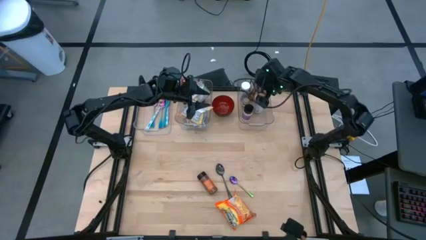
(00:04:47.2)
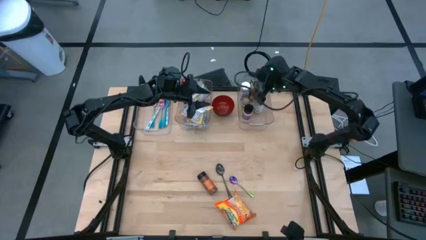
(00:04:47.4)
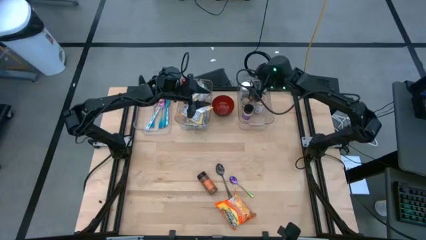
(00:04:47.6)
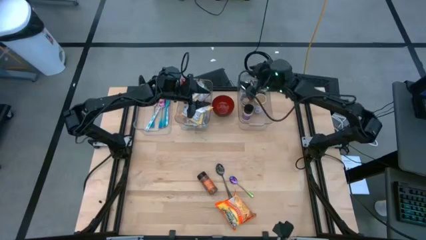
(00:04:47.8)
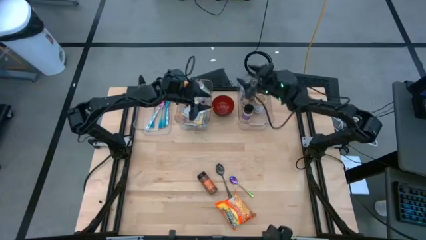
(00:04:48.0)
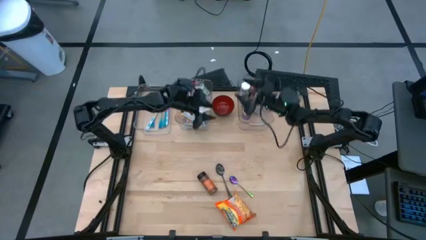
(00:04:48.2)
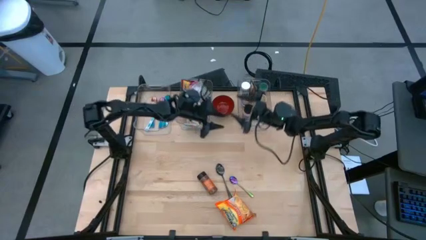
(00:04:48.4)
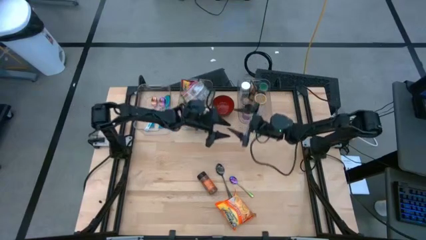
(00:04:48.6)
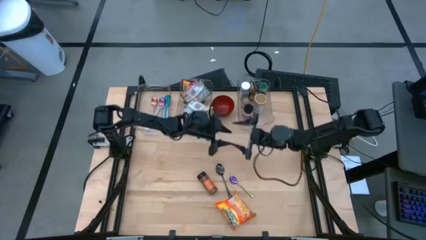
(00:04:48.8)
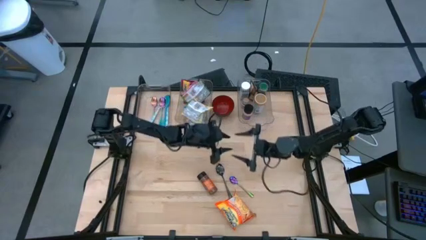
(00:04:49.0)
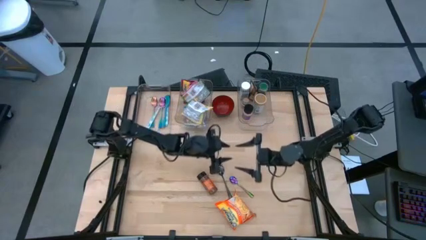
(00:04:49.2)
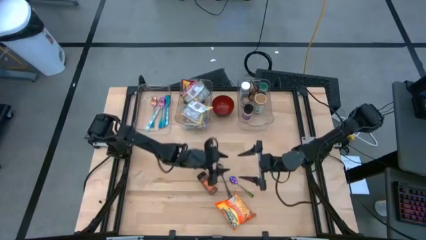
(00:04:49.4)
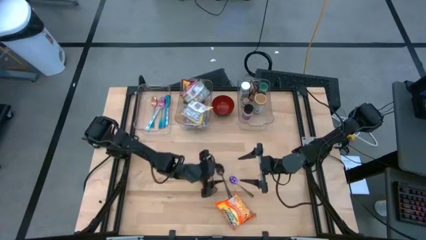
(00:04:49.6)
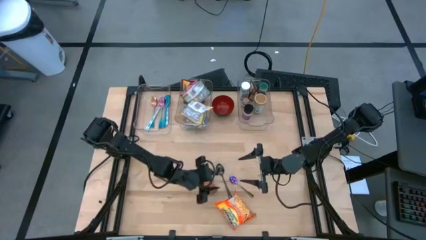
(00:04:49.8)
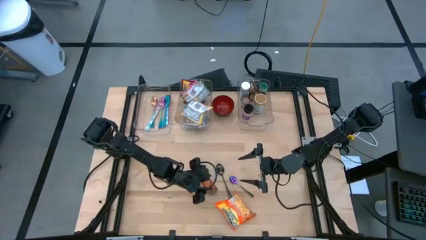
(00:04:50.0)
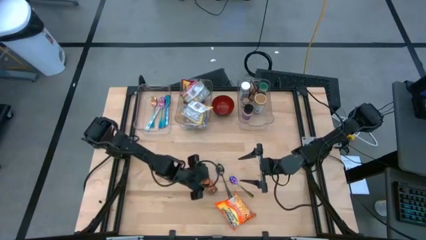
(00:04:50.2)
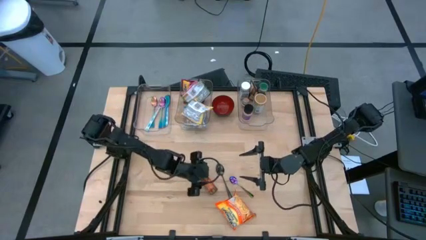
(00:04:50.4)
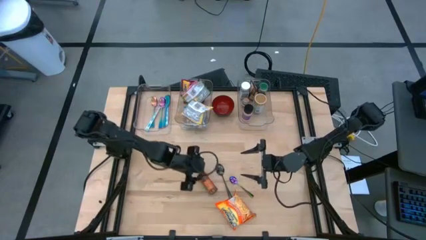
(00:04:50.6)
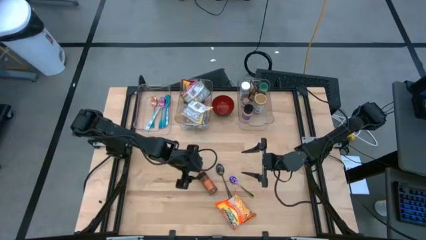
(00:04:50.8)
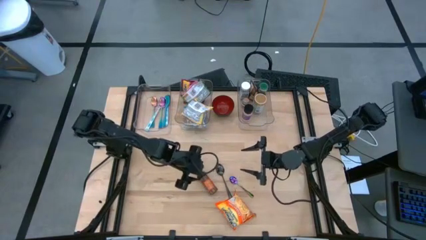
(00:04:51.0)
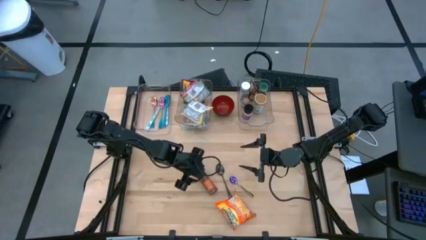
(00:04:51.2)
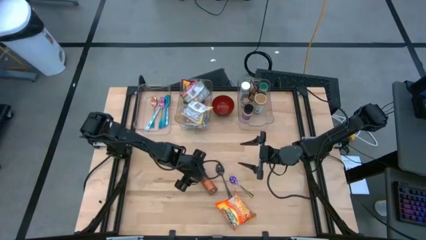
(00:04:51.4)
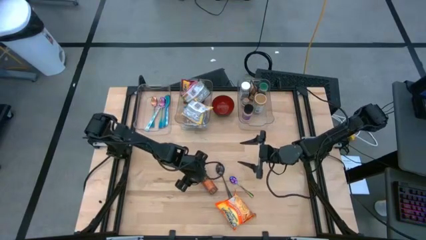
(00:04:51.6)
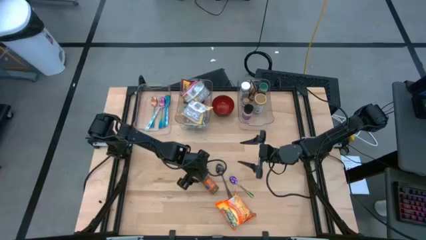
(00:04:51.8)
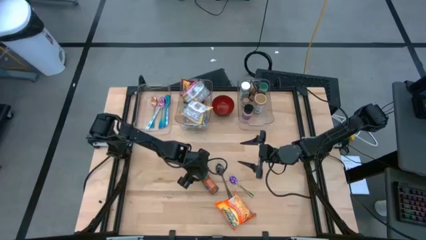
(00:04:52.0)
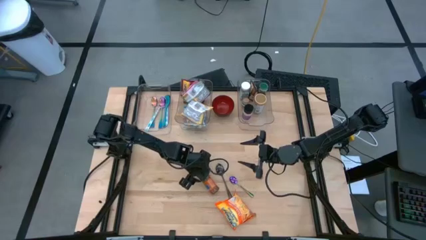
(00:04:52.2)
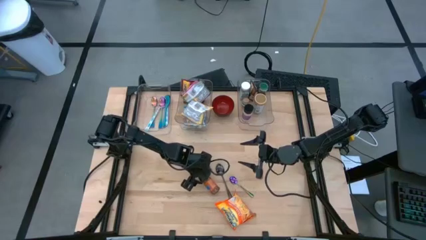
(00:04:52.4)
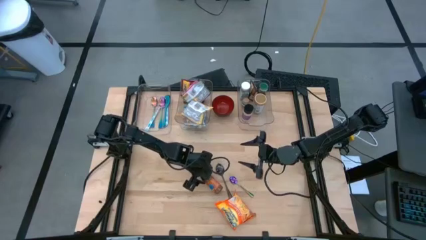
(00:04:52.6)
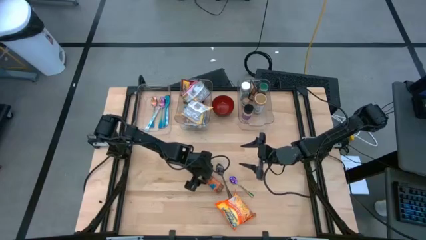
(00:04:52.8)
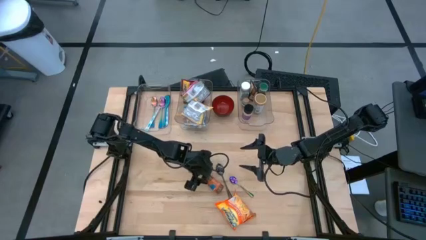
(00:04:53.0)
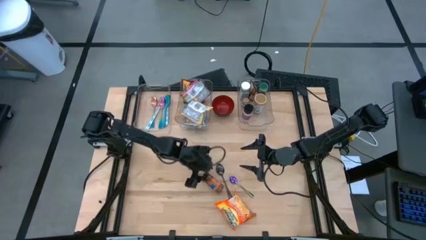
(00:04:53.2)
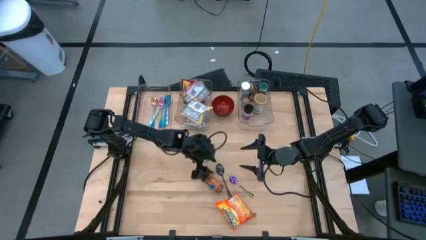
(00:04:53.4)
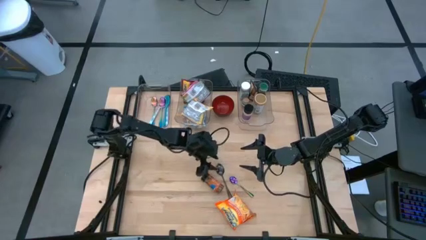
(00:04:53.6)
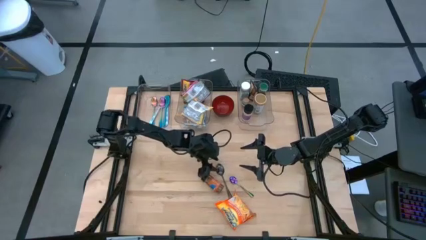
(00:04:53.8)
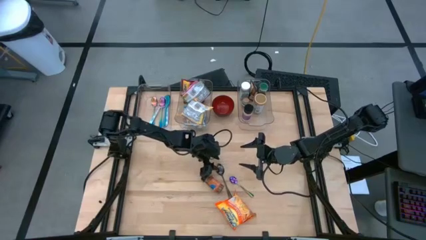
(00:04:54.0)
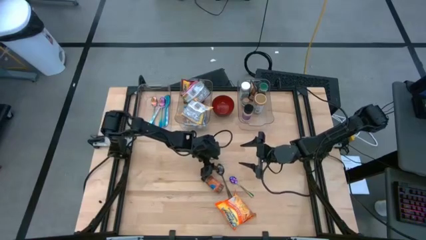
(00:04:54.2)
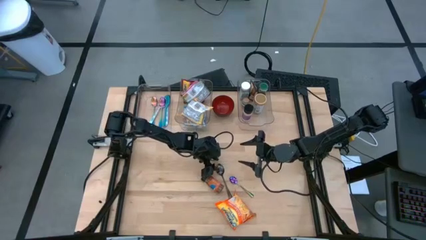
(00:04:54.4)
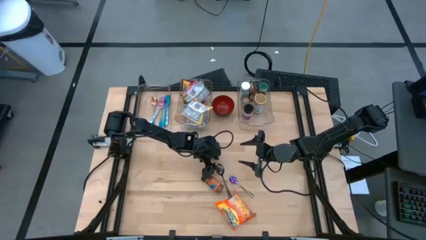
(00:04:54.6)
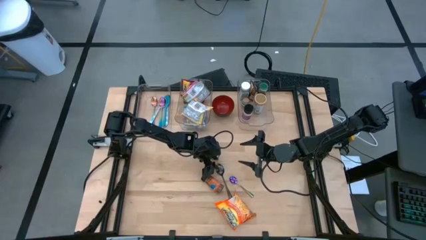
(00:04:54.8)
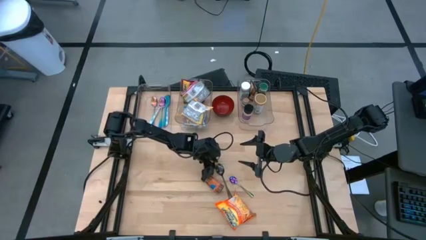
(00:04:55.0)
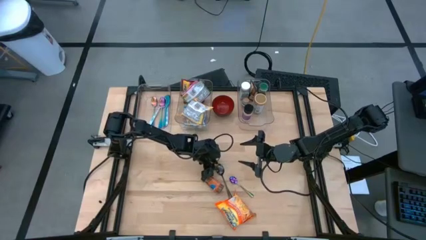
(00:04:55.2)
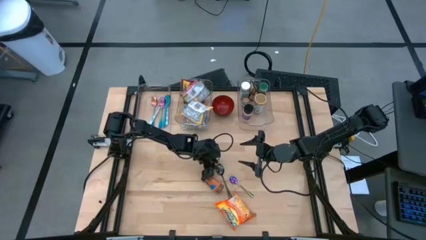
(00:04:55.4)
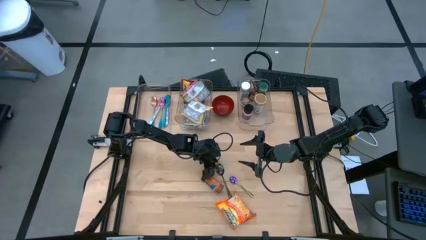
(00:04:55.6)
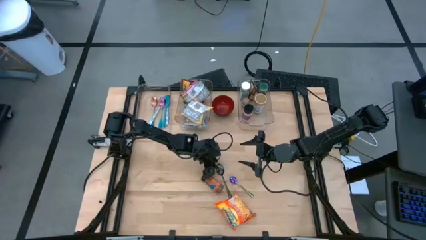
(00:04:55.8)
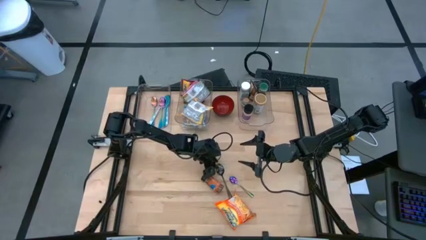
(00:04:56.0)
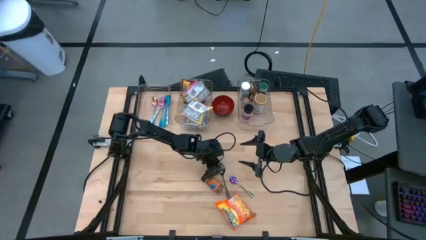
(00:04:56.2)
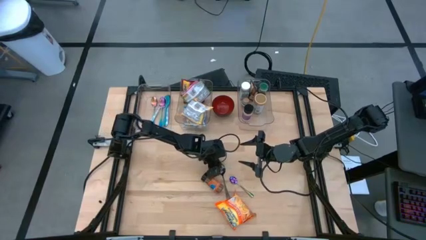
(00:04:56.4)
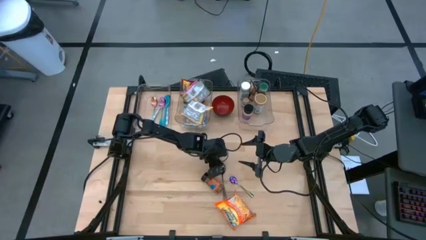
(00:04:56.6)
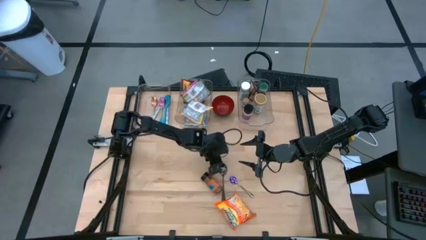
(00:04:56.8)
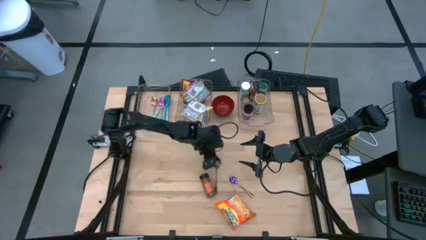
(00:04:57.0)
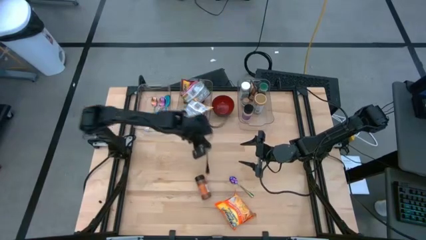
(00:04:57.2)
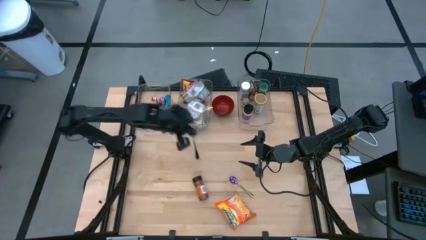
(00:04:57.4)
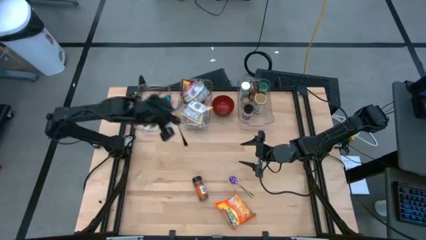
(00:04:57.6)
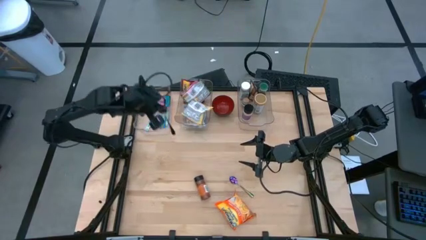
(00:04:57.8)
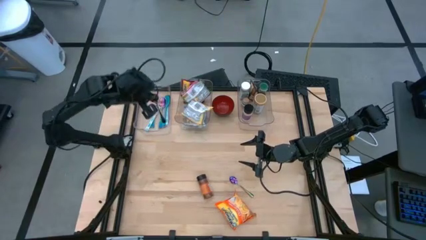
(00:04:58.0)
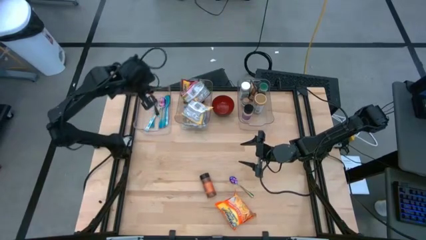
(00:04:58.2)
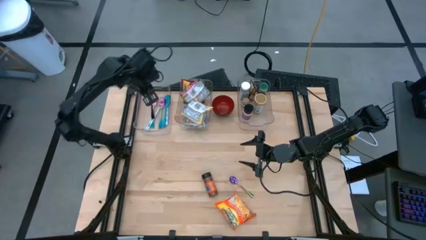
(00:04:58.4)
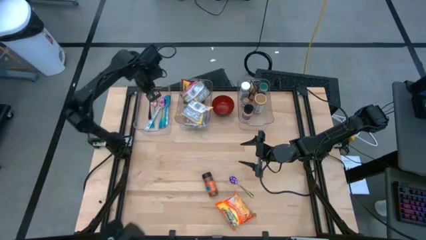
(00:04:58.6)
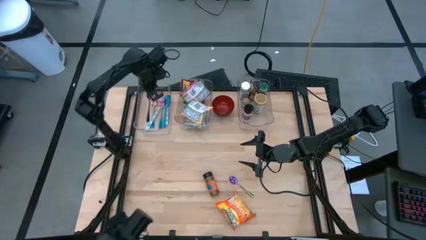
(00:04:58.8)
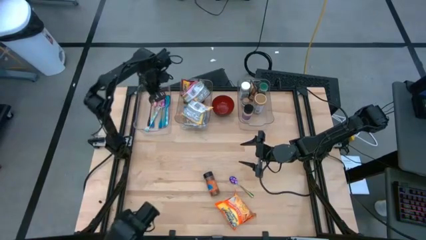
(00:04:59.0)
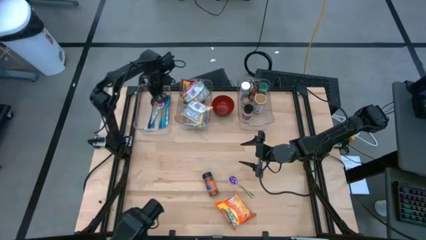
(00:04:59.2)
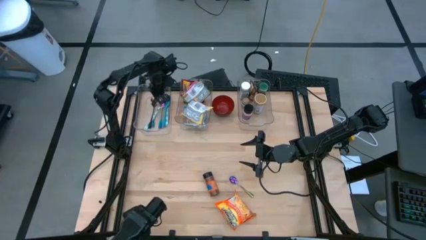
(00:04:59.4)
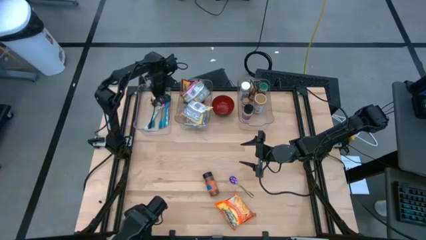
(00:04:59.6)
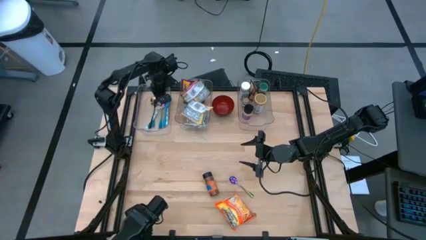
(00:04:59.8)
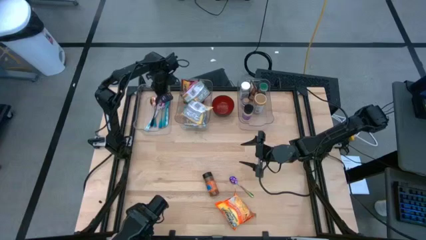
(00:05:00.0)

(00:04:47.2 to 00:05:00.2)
Task: Pick & Place Food Item
Put the black spoon into the left transparent bin
